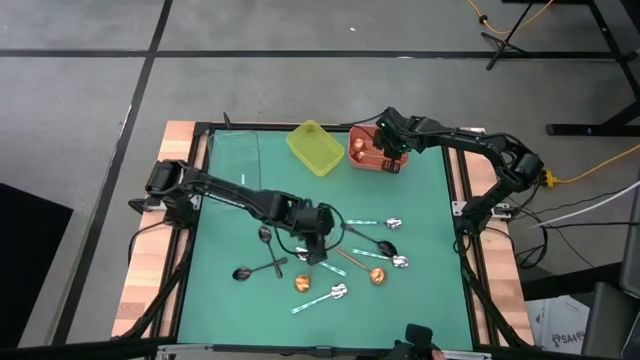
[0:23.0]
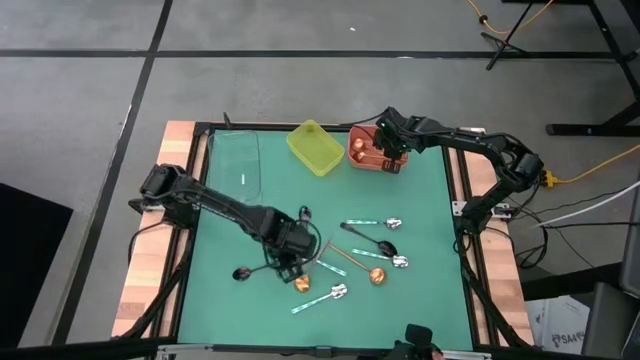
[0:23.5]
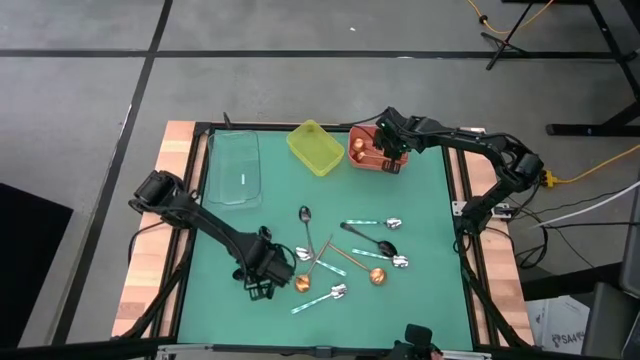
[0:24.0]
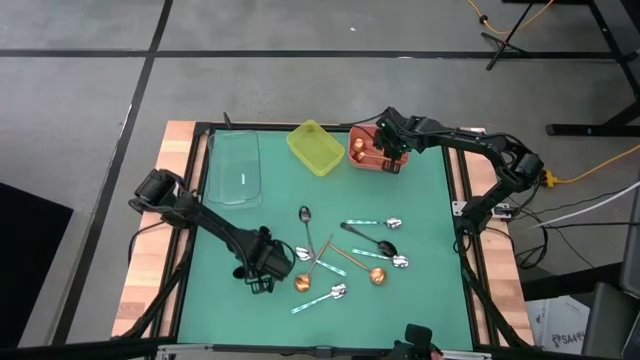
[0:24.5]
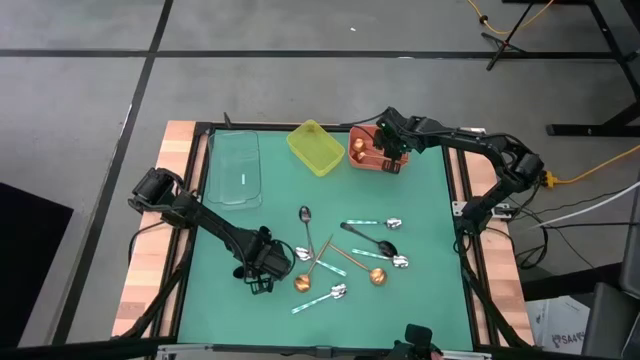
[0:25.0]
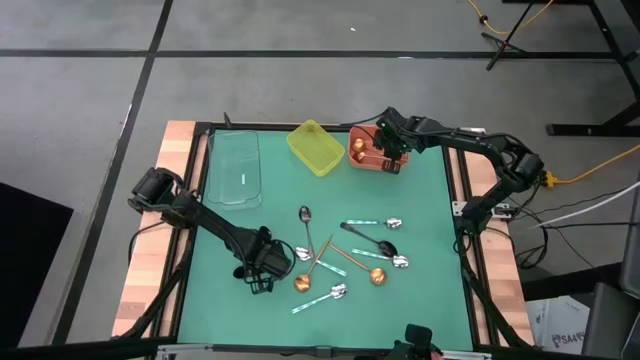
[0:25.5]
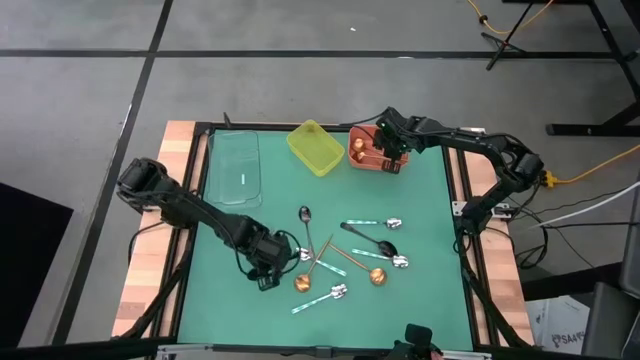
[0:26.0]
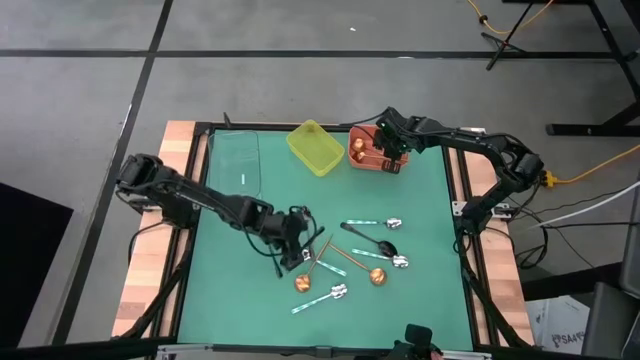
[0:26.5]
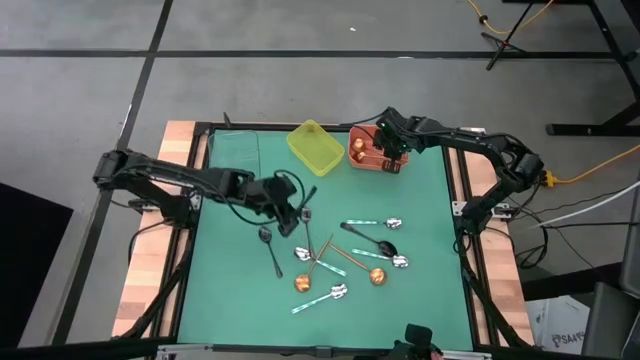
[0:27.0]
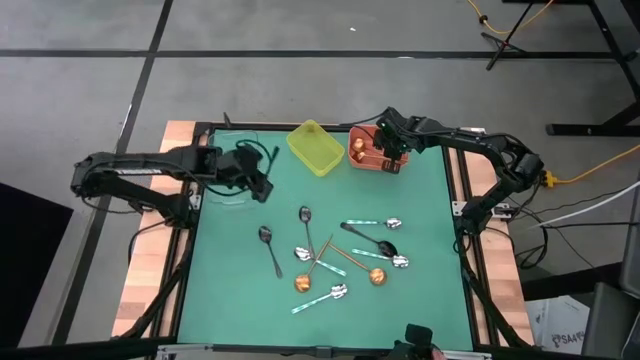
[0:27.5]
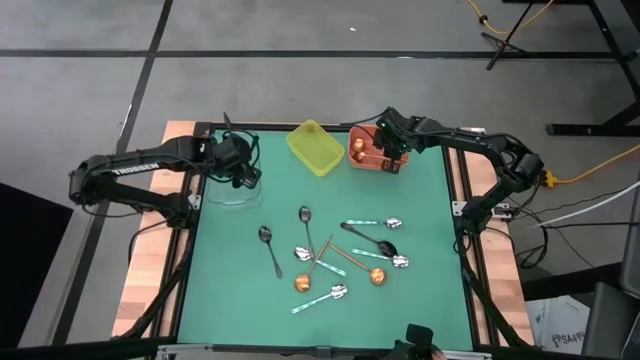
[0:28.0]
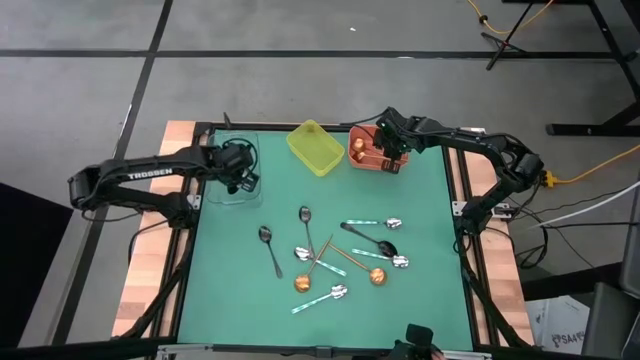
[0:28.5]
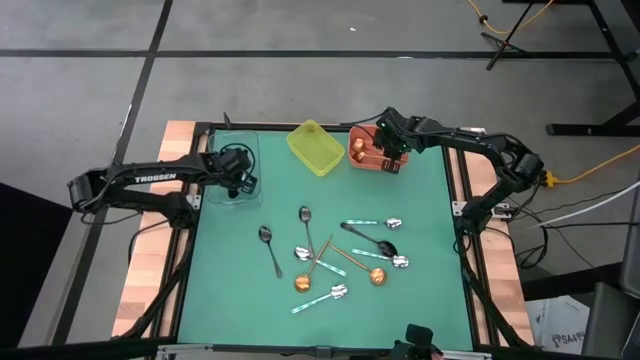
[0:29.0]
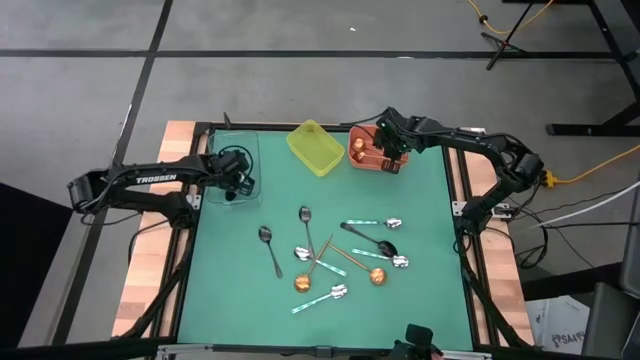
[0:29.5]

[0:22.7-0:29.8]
Task: Sort silverware by color (type)
Put the black spoon into the transparent bin

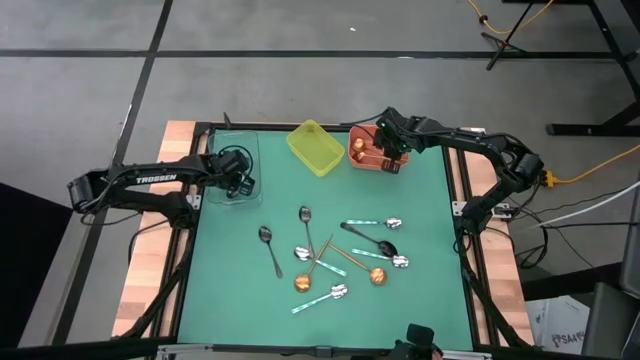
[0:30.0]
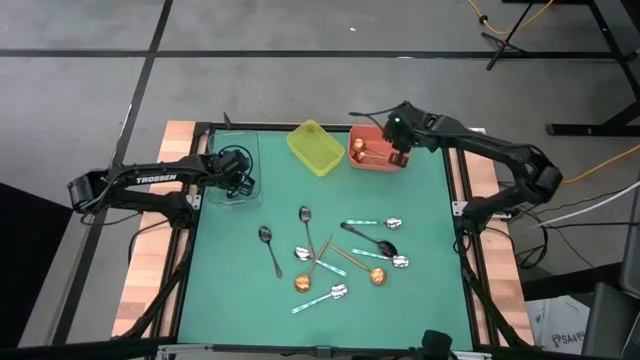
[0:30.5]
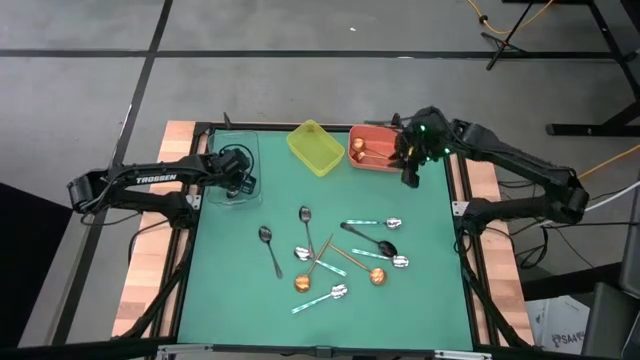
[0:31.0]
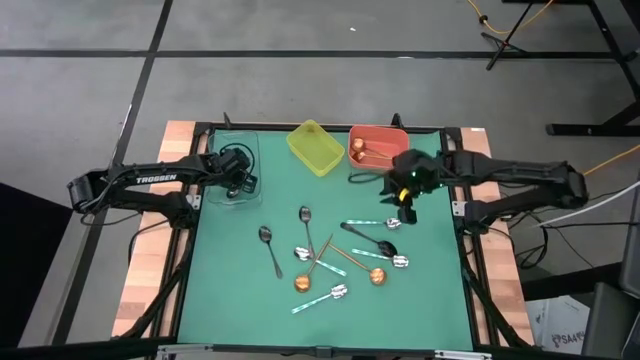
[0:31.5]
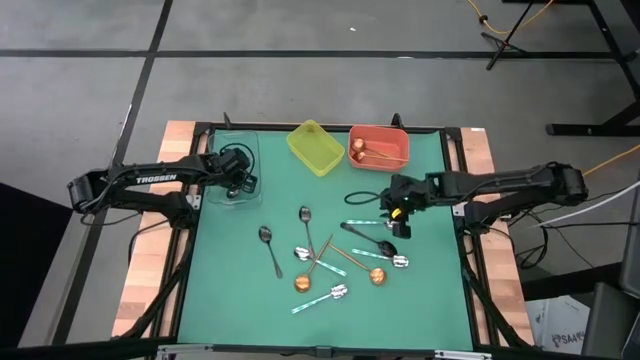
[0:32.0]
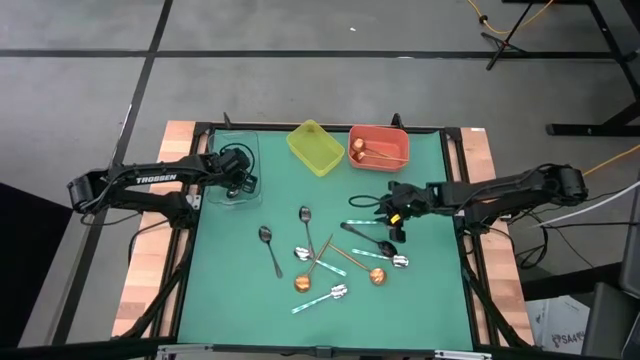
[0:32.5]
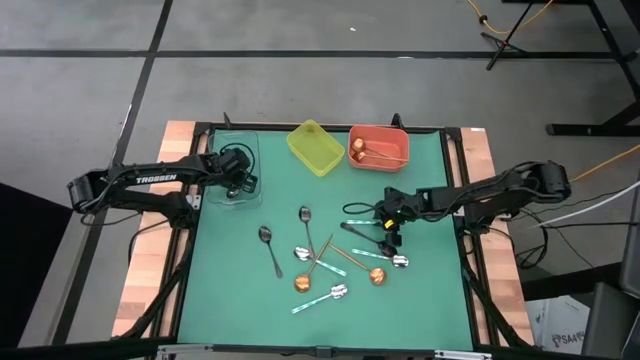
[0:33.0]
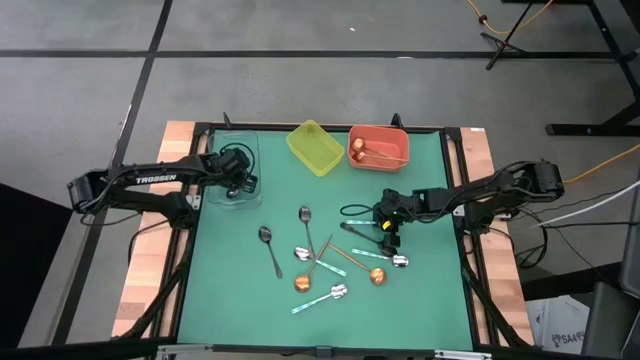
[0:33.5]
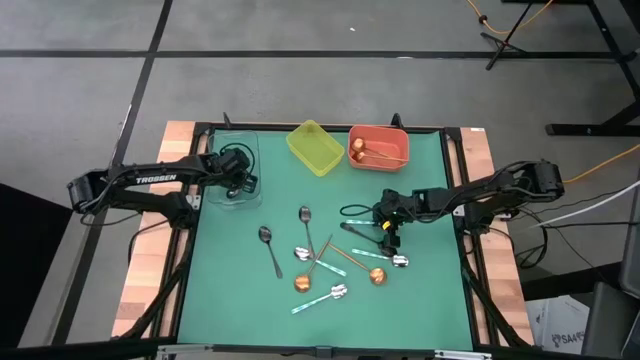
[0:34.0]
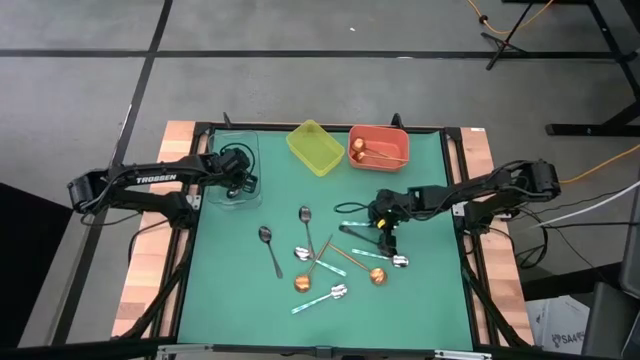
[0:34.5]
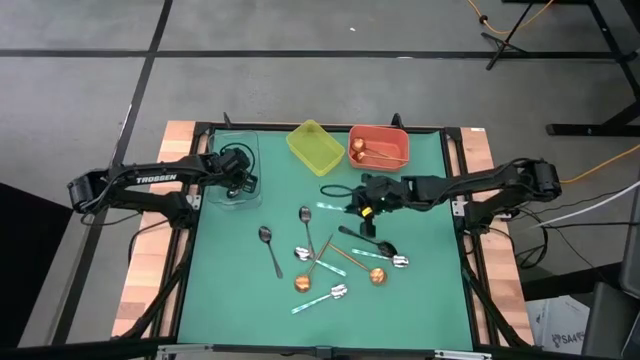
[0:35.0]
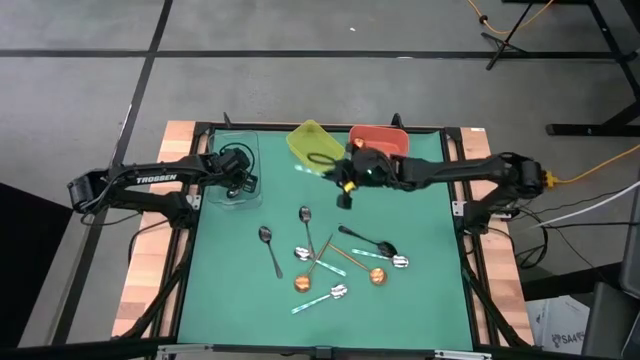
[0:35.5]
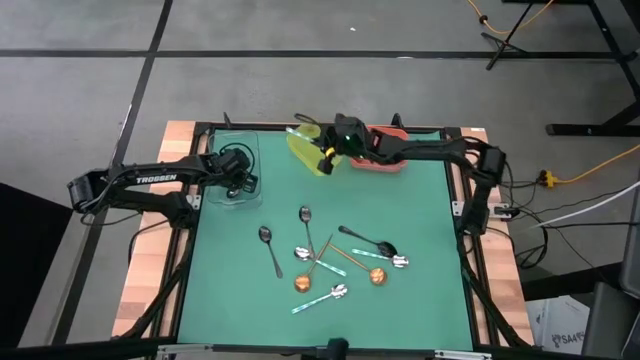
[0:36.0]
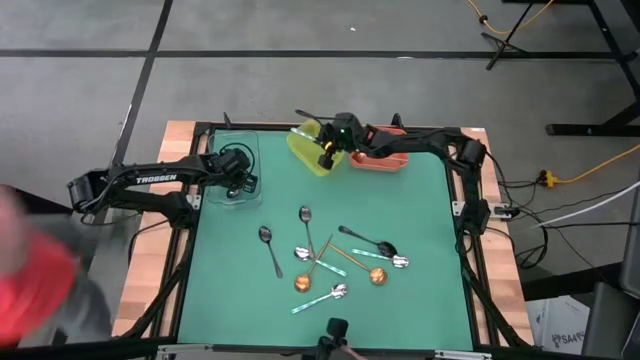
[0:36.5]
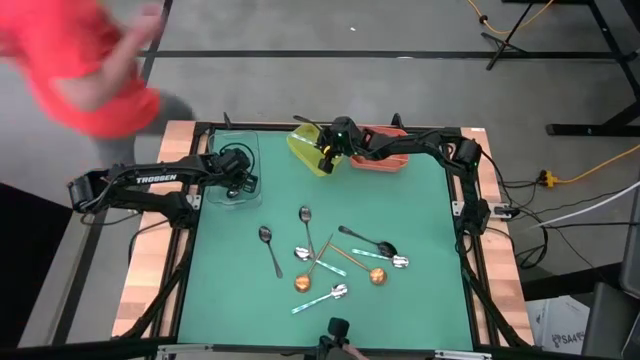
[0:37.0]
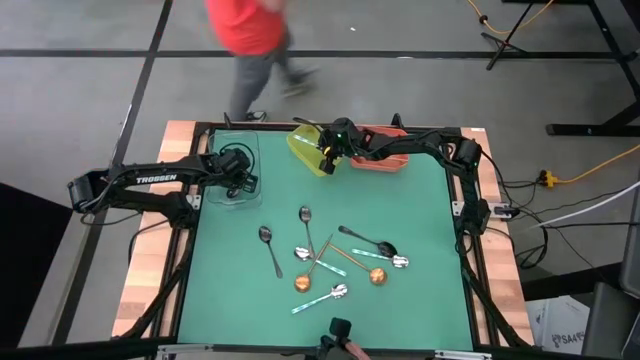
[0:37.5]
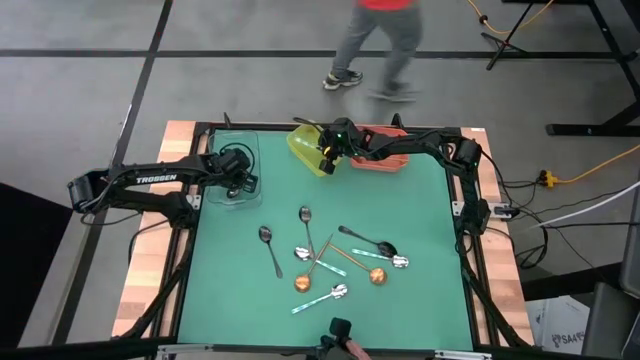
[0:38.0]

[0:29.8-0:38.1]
Put the blue spoon into the green bin

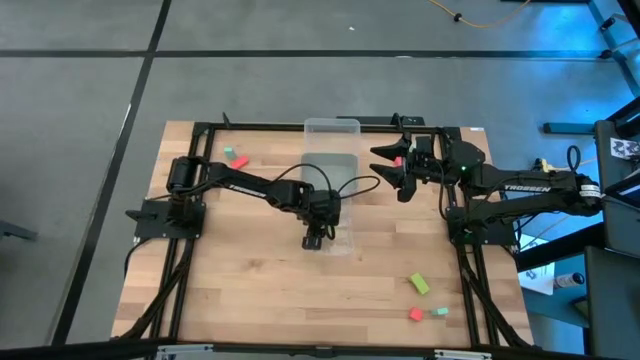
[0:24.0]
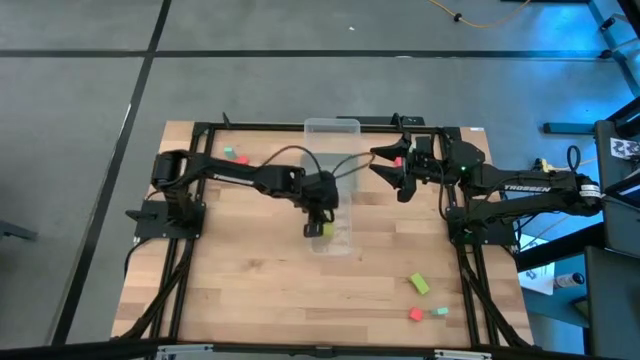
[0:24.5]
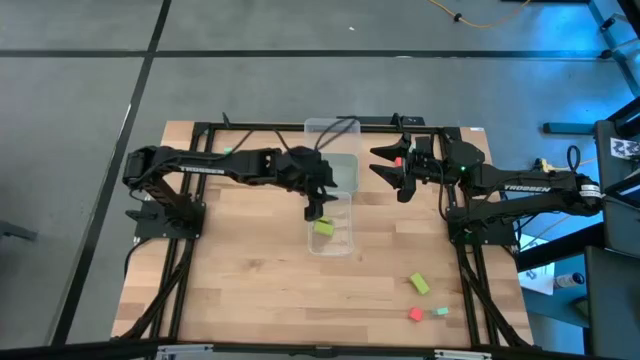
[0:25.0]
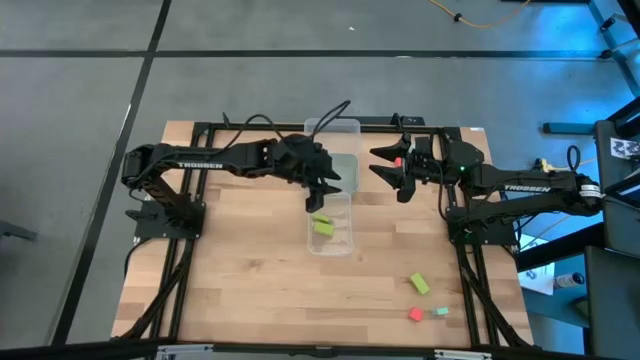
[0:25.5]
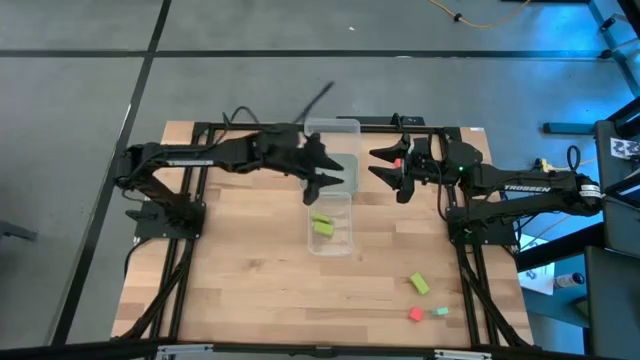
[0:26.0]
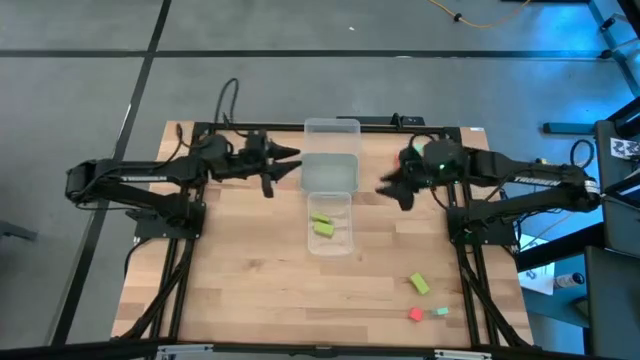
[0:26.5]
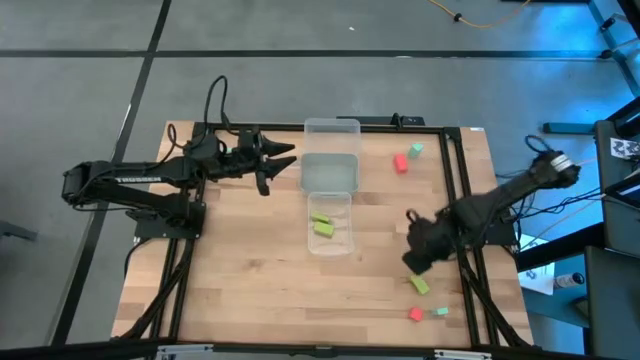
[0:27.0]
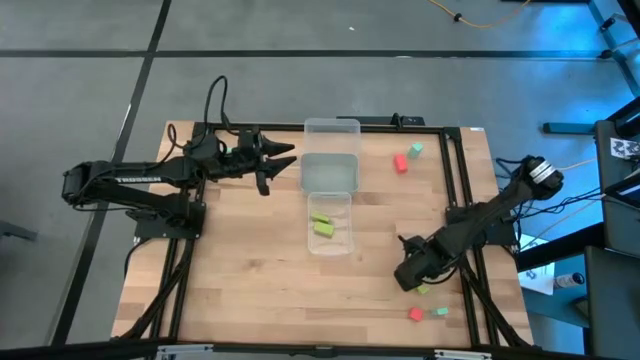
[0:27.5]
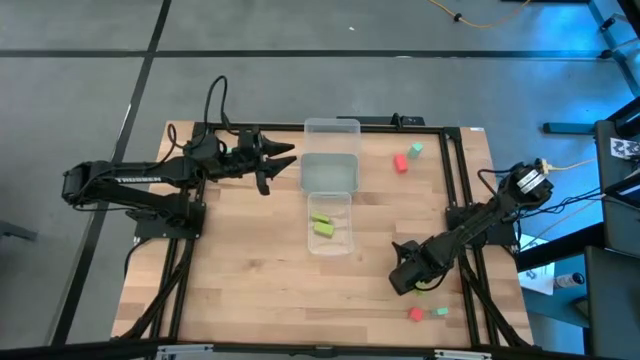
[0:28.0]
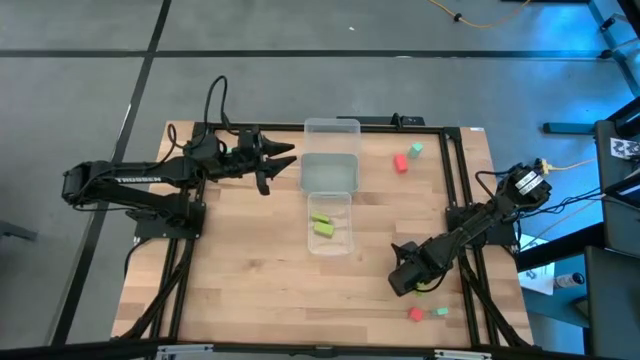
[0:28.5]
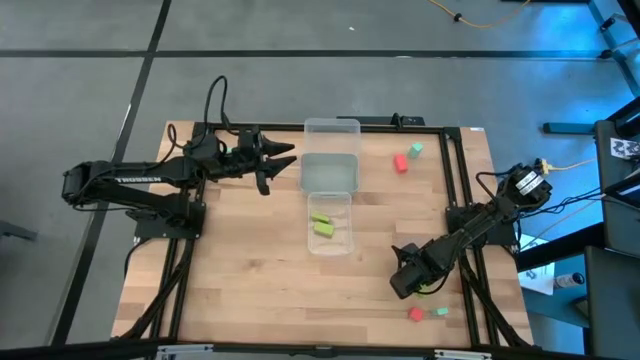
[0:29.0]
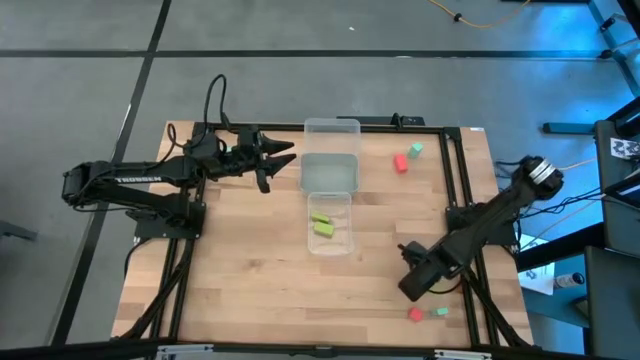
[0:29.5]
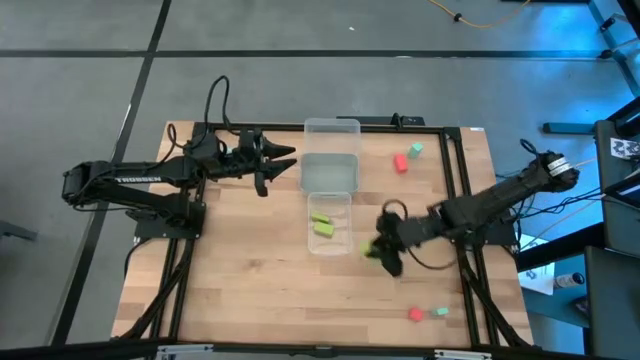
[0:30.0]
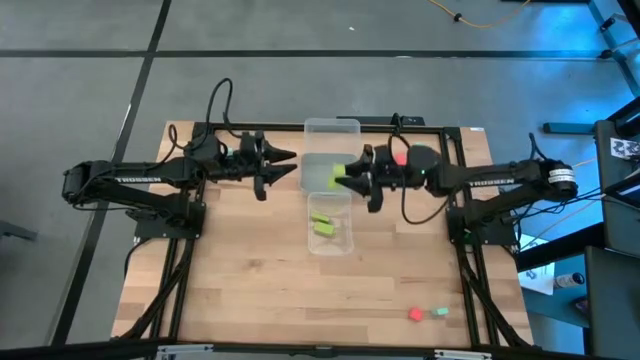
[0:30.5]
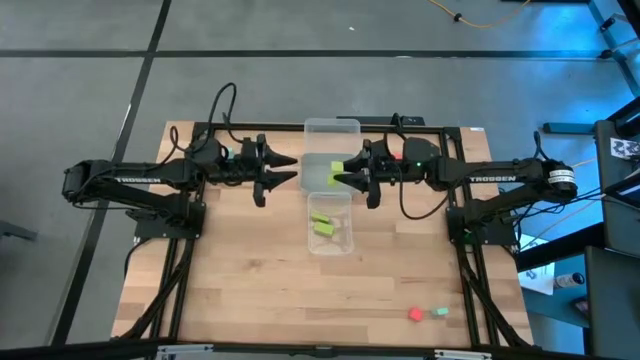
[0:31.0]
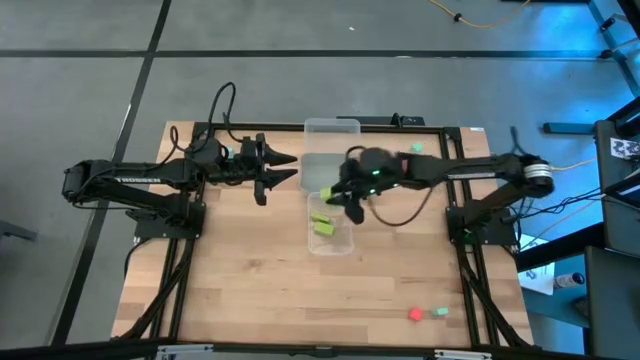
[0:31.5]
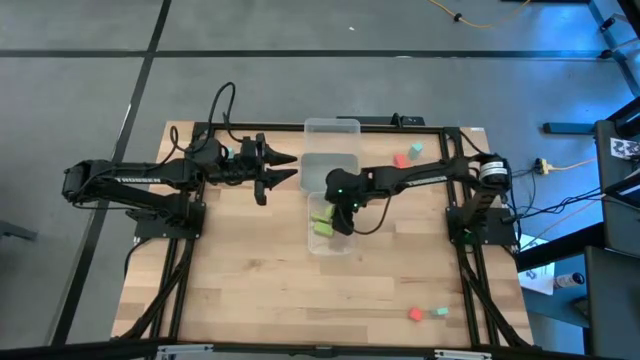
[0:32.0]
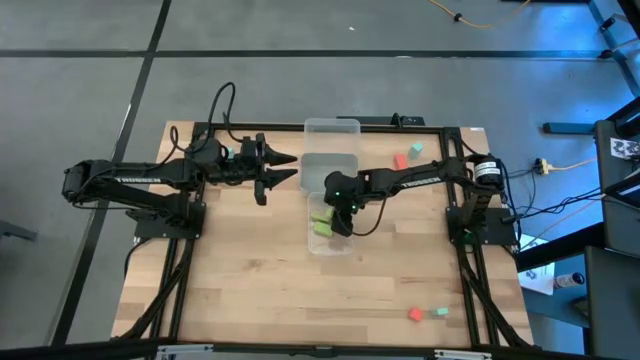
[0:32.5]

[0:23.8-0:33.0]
Task: Sort & place blocks by color
Put the green block into the bottom transparent bin
